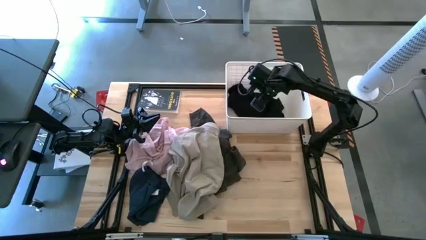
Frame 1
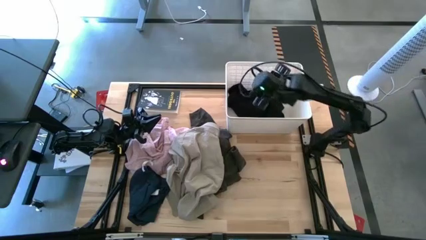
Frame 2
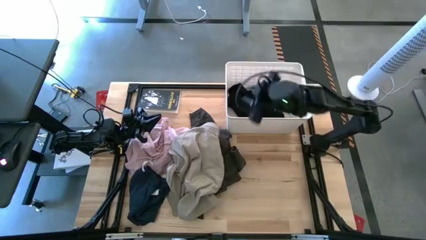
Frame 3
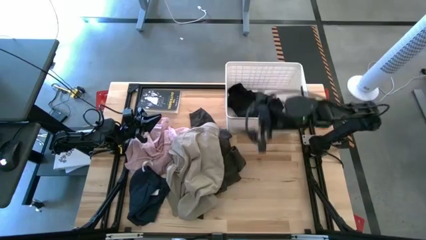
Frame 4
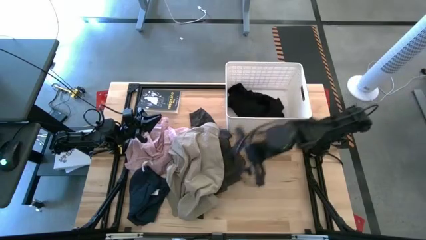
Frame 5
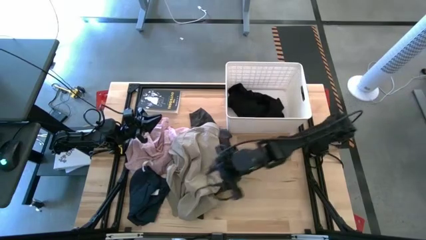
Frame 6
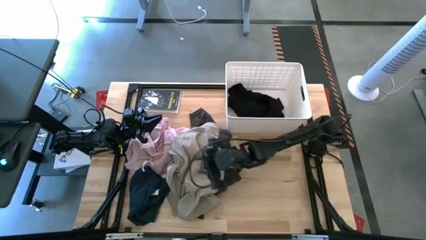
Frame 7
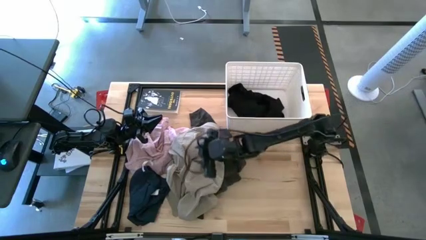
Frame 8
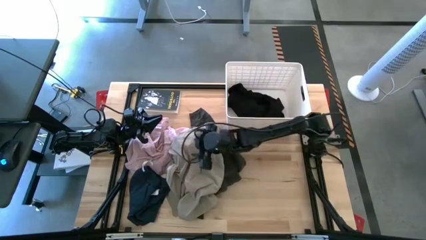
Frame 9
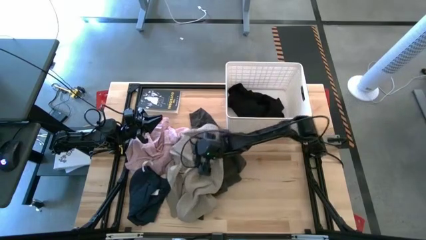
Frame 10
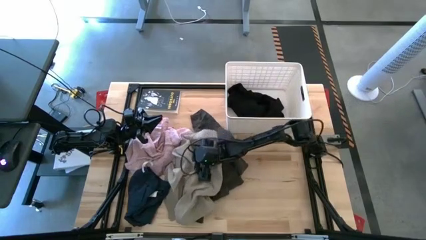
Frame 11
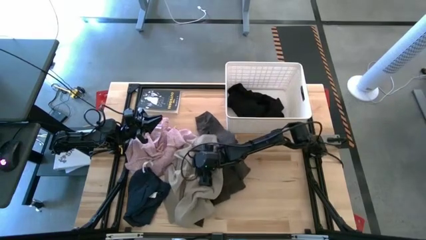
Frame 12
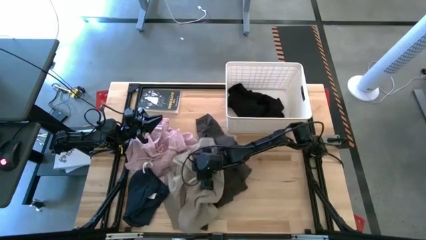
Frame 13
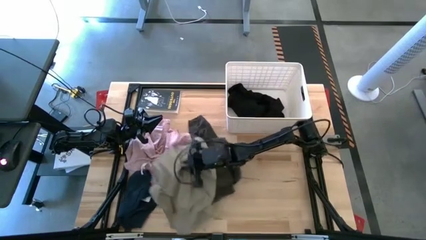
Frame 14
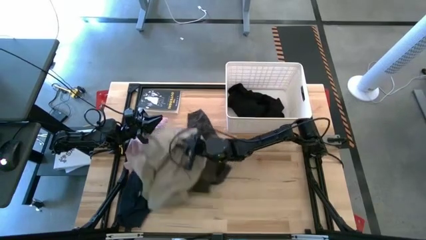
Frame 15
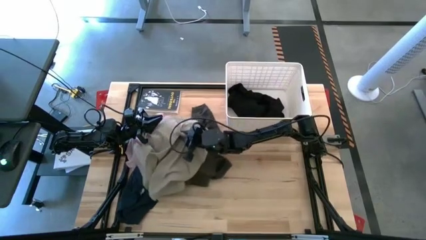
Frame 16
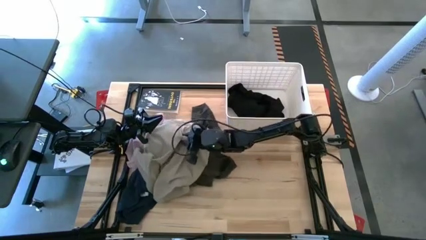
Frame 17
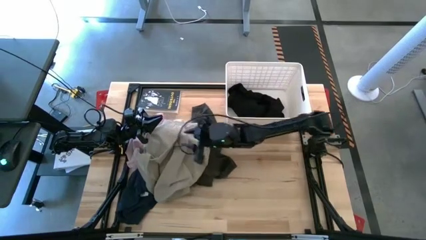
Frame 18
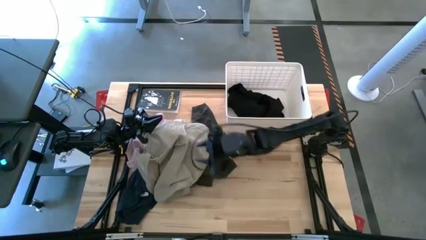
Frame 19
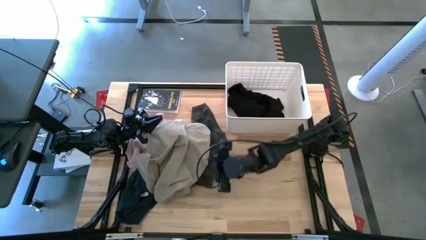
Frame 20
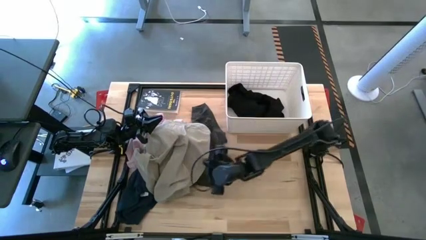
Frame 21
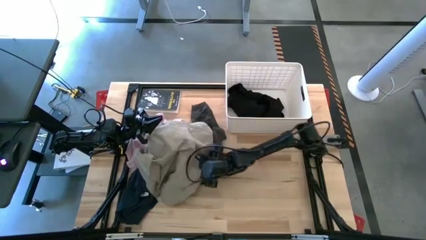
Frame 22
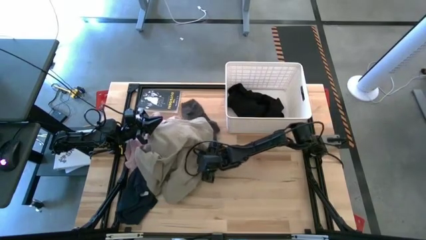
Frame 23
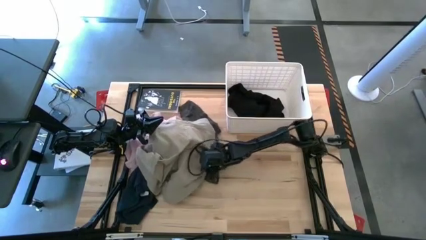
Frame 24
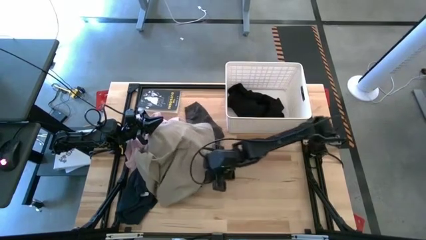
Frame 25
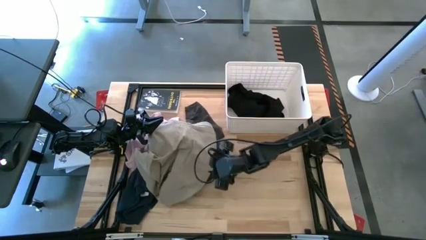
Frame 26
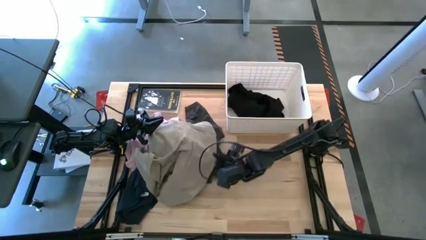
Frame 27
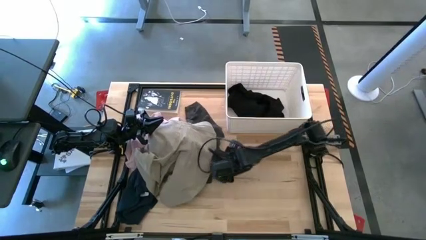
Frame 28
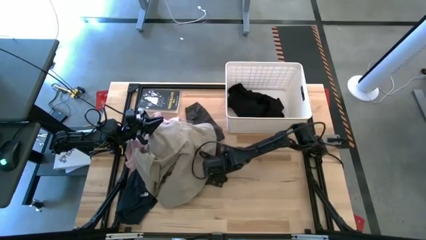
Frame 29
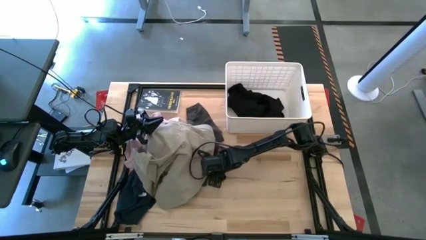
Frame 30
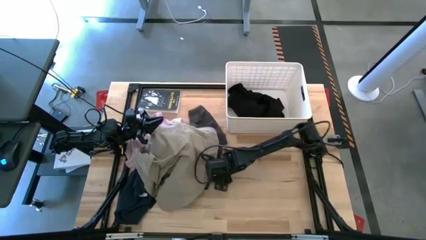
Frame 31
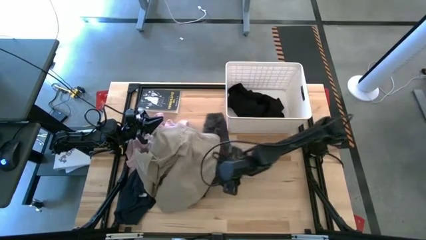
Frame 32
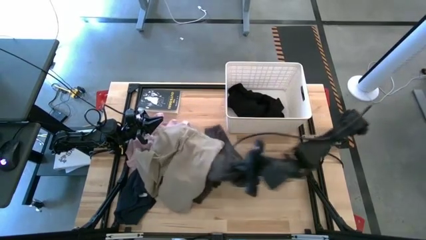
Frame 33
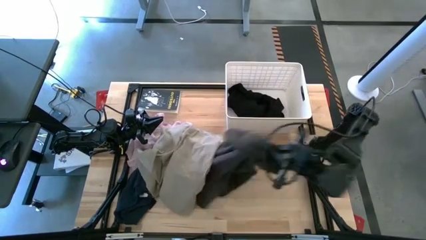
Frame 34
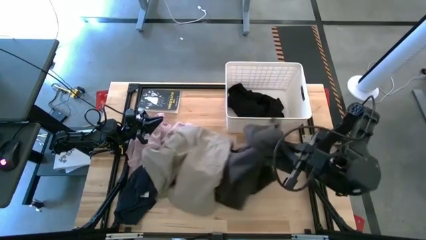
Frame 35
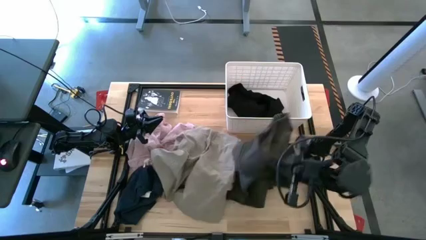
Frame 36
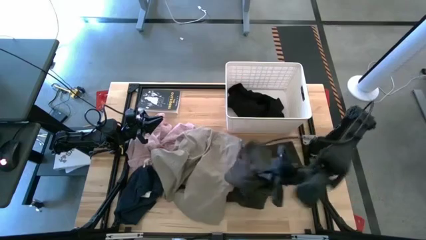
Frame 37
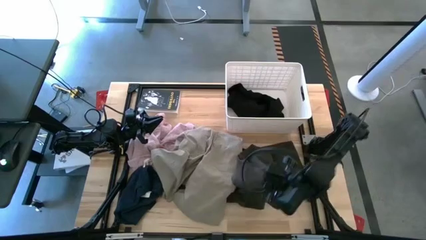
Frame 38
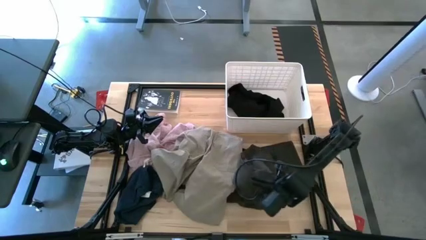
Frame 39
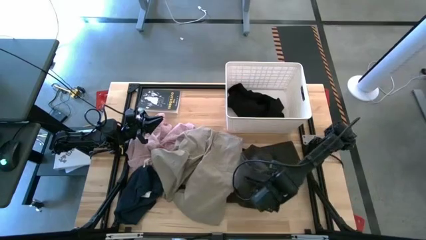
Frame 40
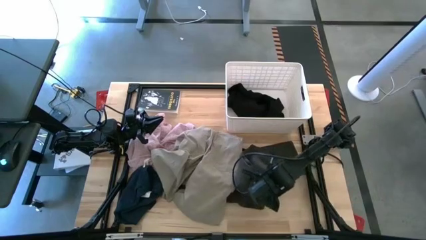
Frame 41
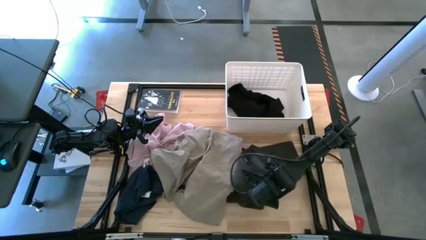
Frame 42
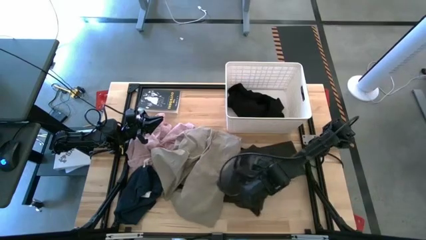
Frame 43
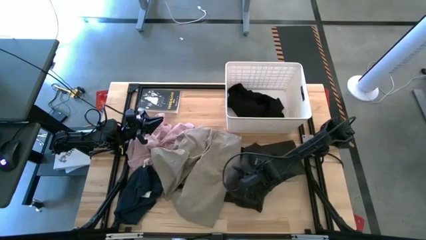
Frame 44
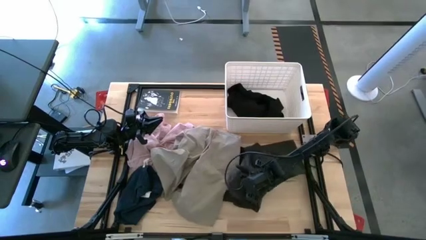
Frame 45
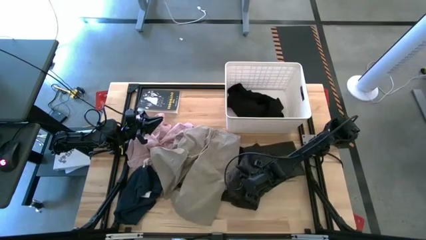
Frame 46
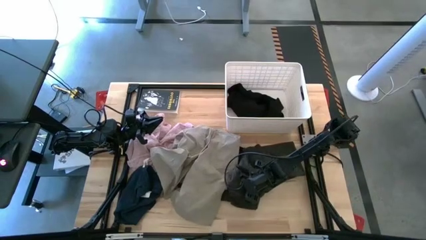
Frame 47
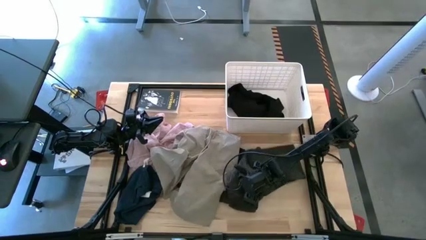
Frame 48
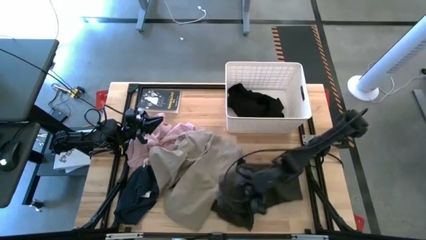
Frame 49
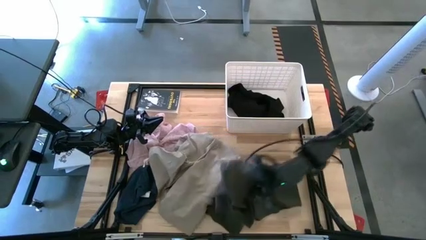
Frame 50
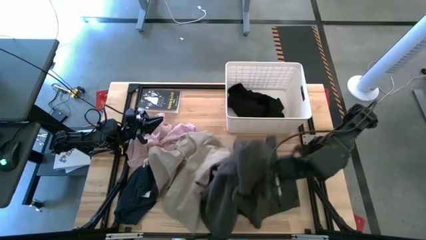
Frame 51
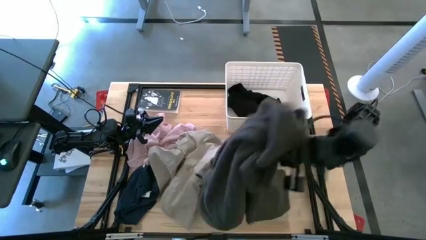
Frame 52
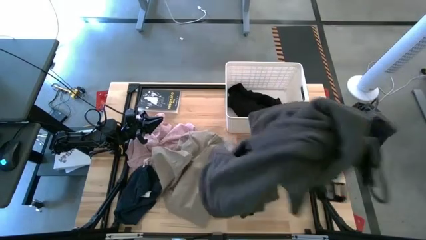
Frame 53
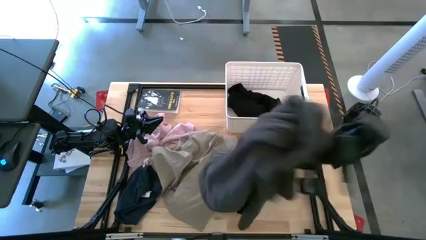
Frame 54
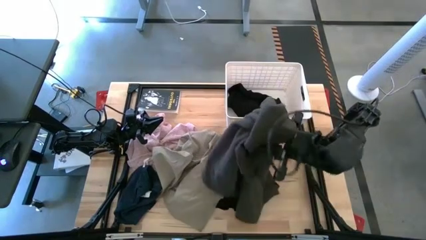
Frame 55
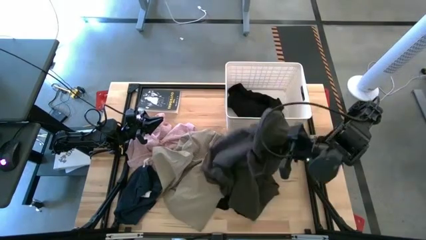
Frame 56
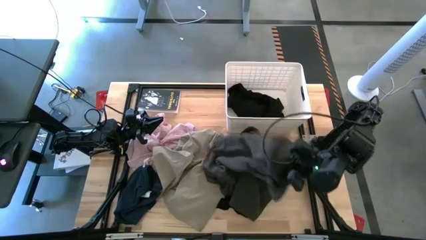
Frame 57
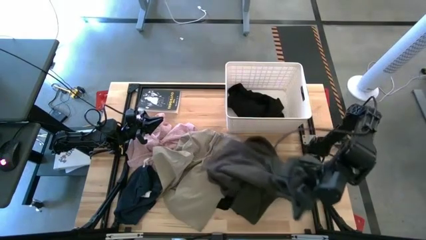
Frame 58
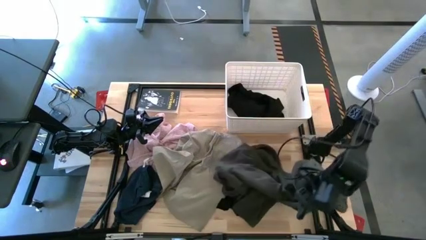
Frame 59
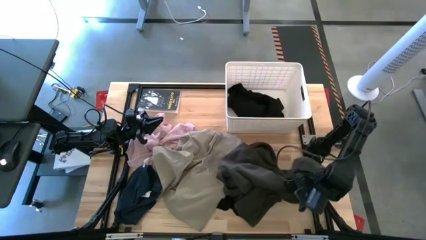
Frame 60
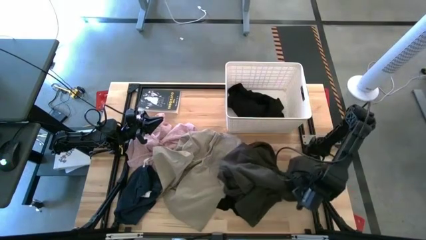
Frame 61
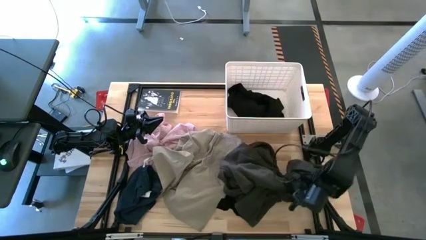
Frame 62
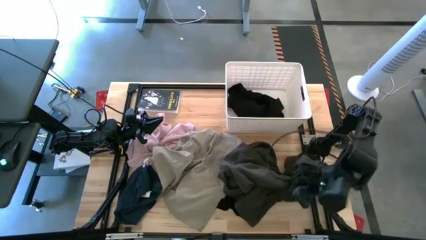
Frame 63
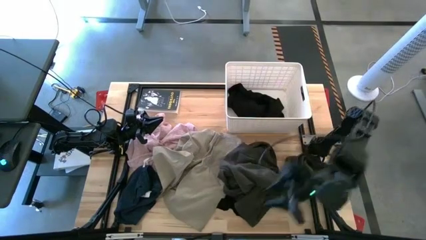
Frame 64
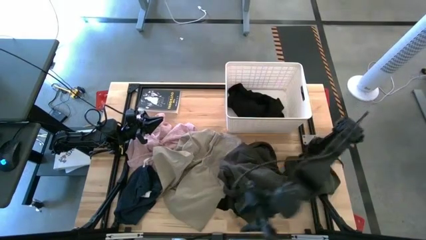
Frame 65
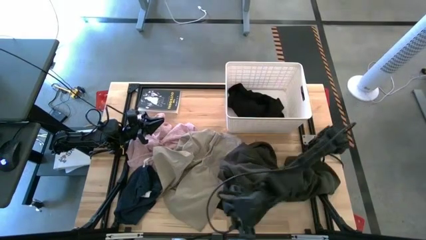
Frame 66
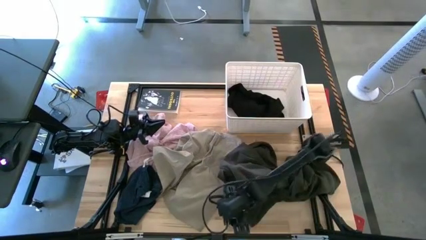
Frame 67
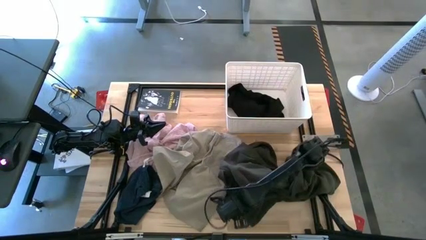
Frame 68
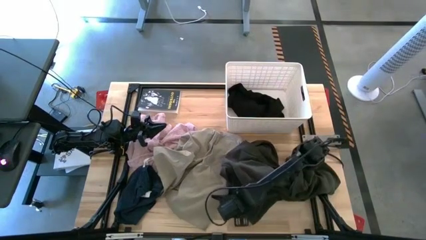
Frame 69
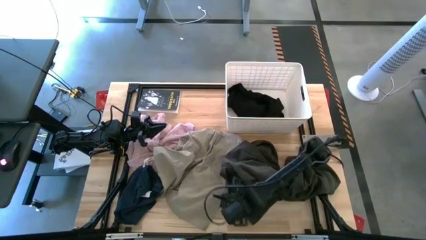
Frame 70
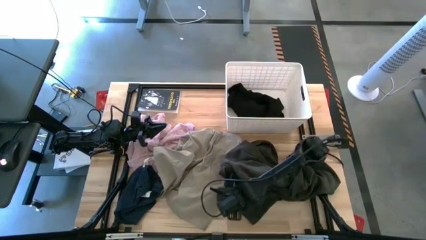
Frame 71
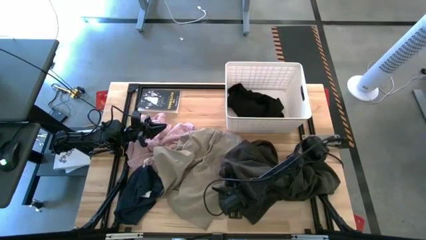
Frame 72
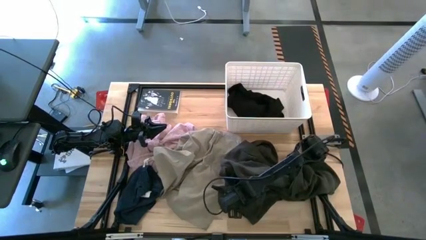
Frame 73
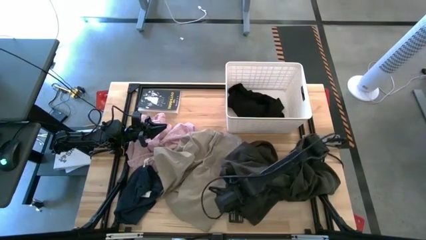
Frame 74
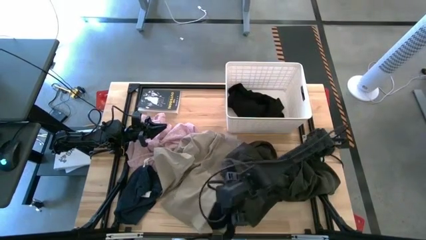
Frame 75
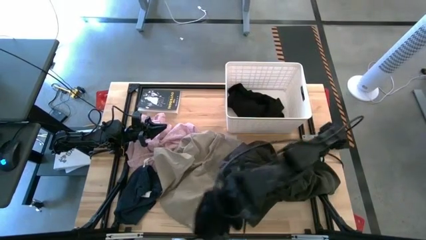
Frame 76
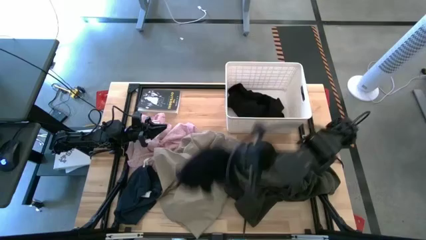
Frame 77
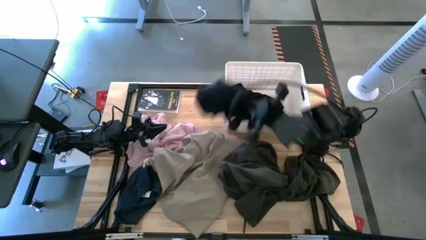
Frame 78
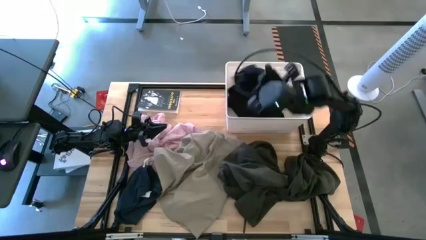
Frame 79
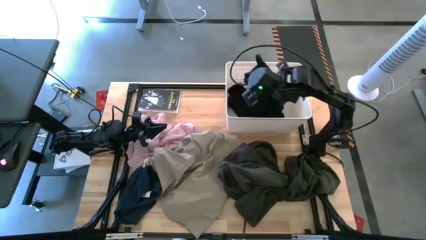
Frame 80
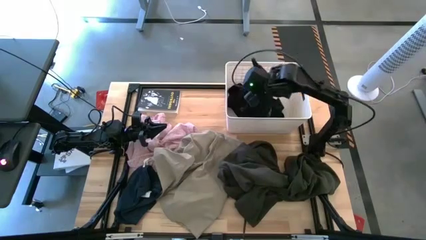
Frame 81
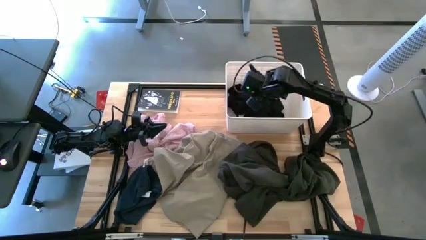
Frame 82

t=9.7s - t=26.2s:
Task: Sort clothes
Put the black shorts into the laundry bin
